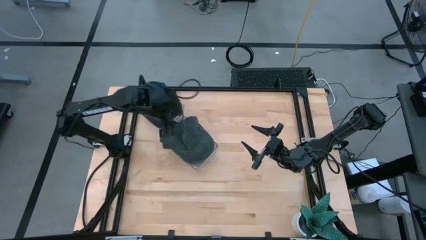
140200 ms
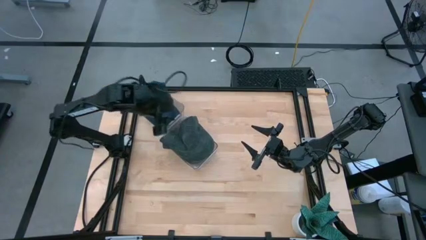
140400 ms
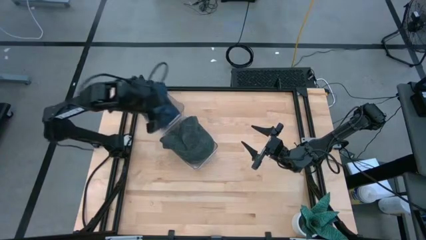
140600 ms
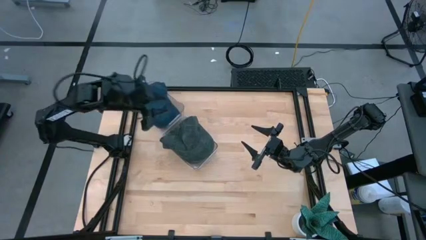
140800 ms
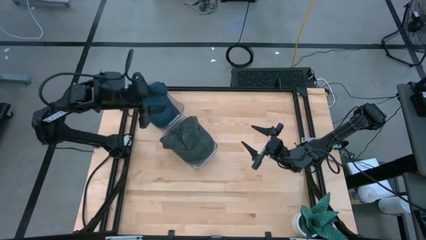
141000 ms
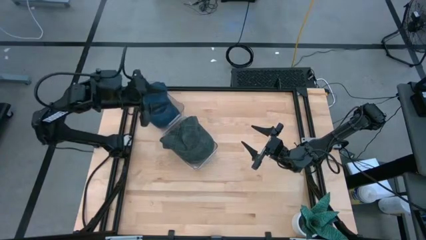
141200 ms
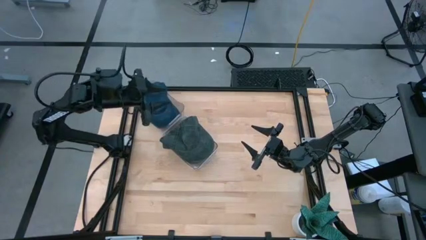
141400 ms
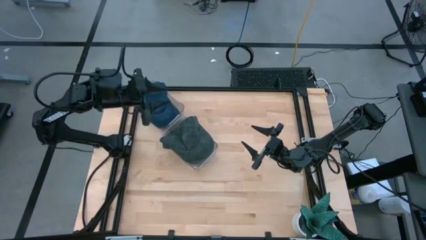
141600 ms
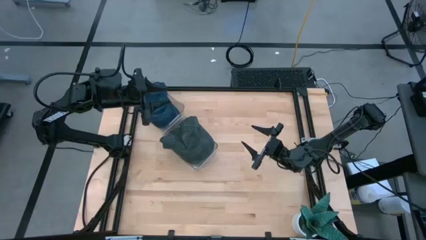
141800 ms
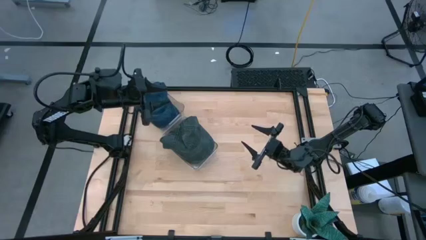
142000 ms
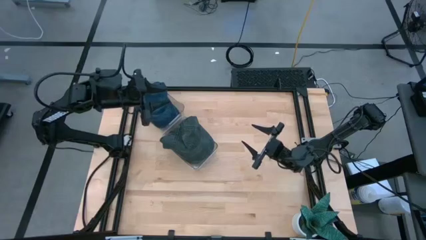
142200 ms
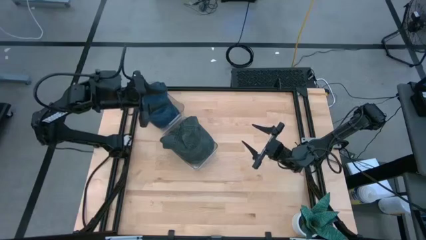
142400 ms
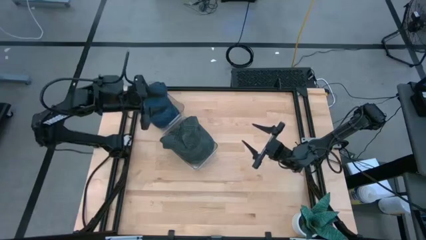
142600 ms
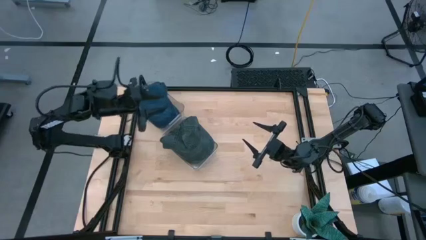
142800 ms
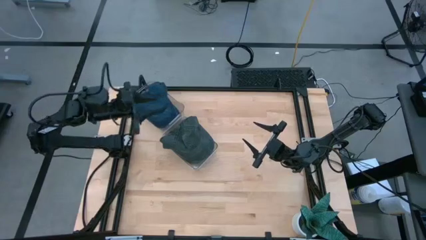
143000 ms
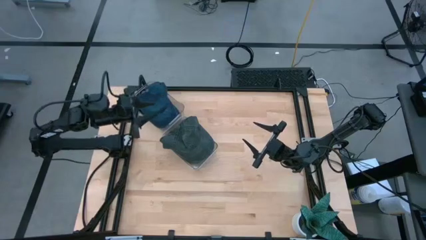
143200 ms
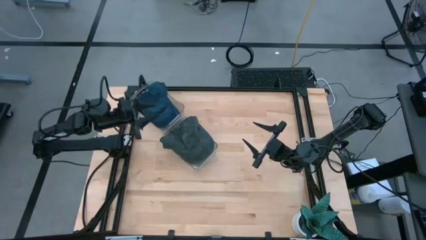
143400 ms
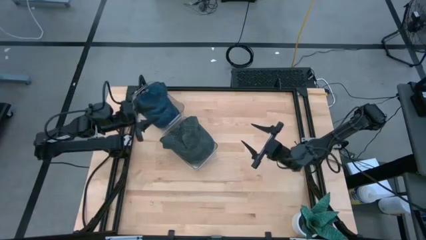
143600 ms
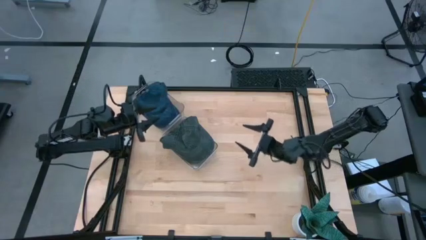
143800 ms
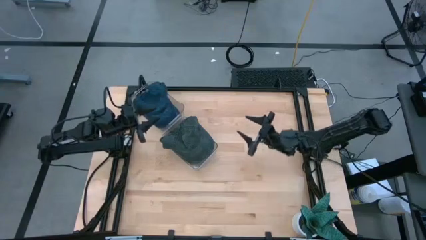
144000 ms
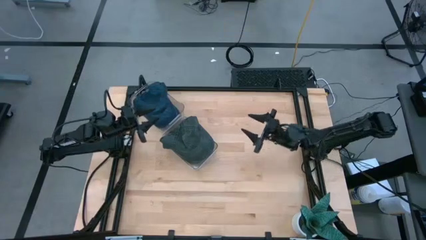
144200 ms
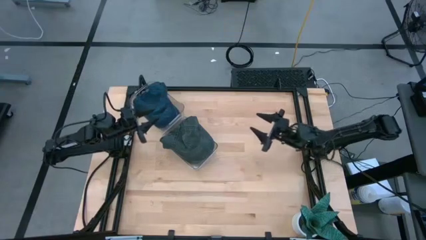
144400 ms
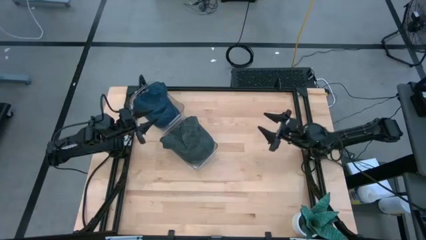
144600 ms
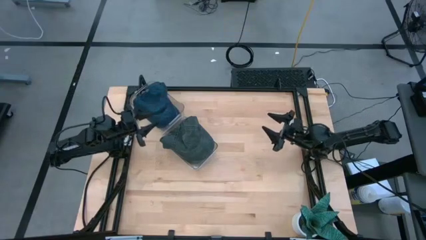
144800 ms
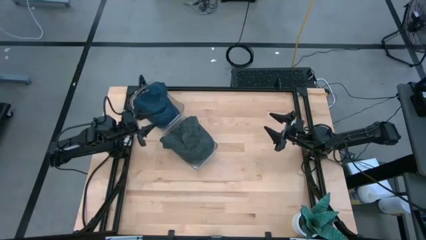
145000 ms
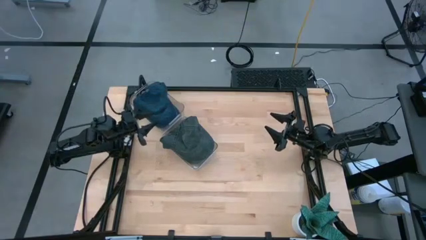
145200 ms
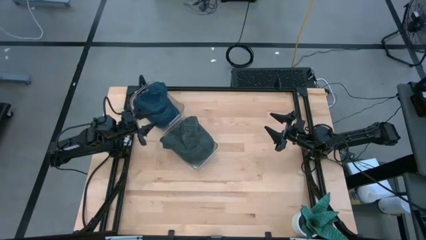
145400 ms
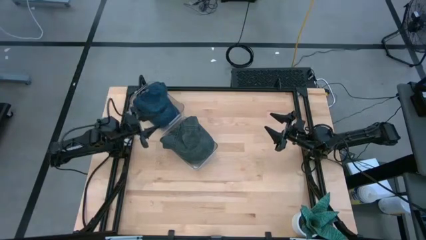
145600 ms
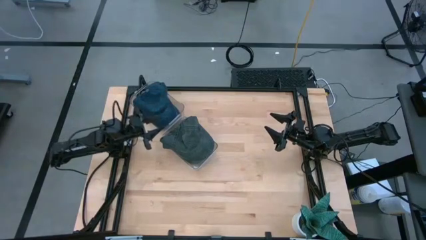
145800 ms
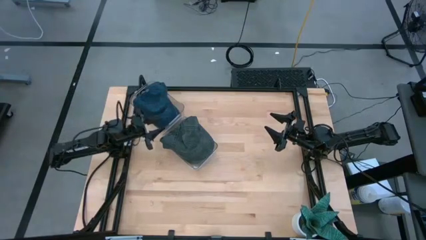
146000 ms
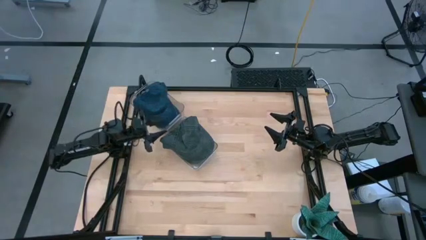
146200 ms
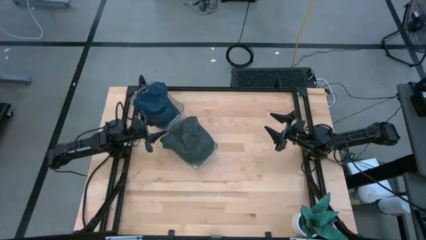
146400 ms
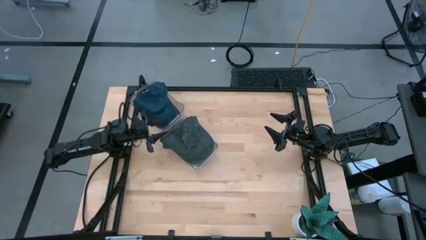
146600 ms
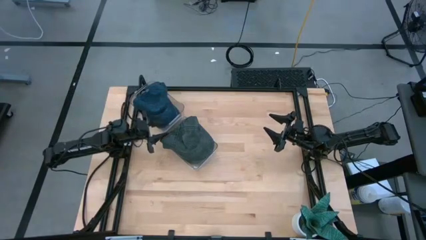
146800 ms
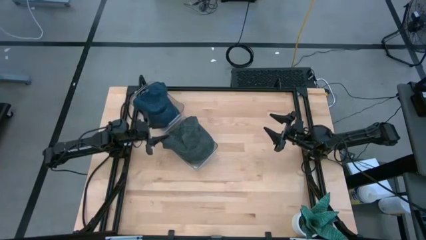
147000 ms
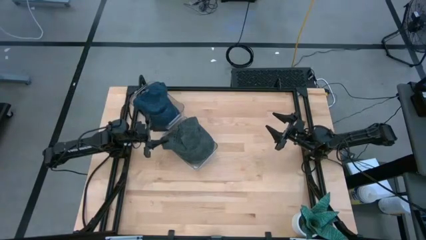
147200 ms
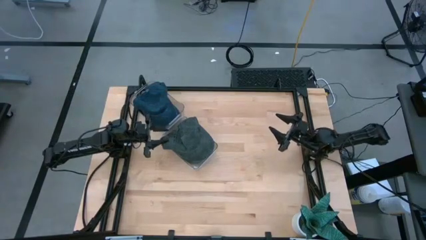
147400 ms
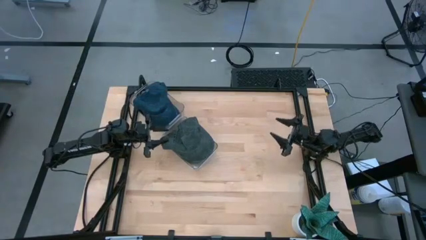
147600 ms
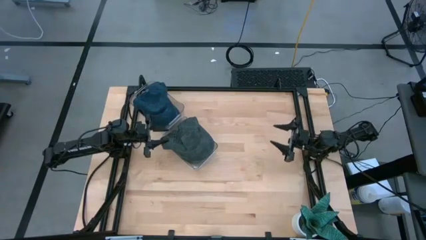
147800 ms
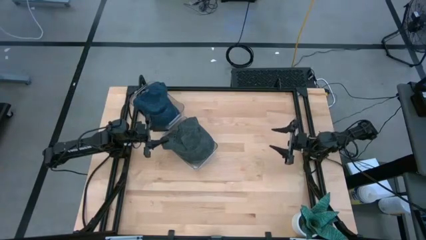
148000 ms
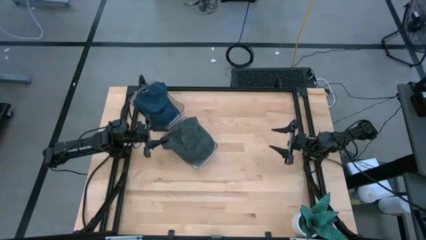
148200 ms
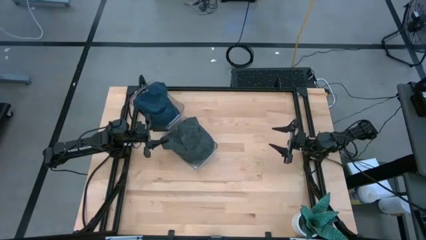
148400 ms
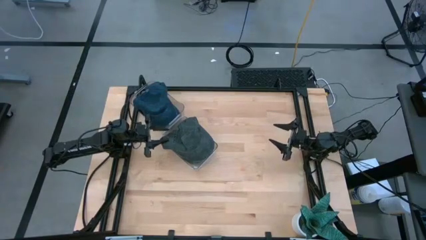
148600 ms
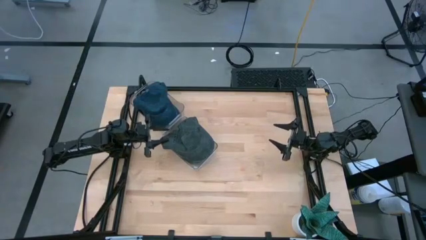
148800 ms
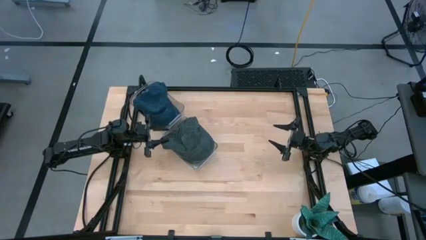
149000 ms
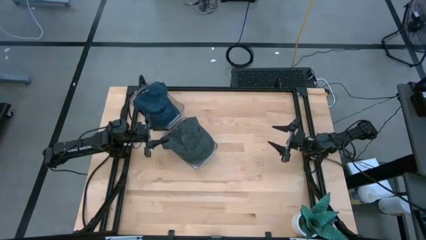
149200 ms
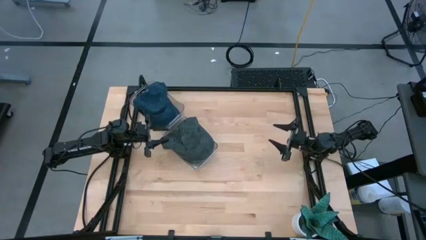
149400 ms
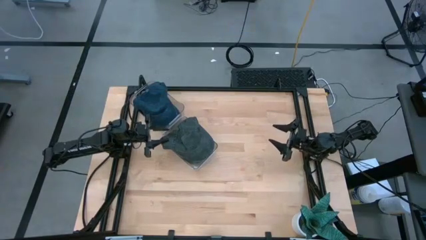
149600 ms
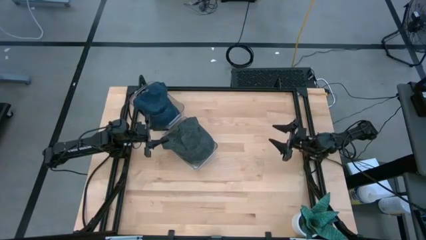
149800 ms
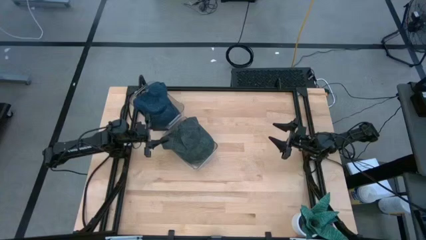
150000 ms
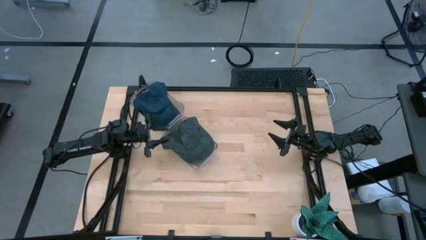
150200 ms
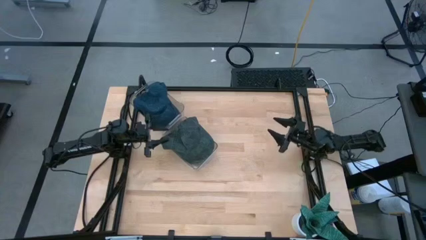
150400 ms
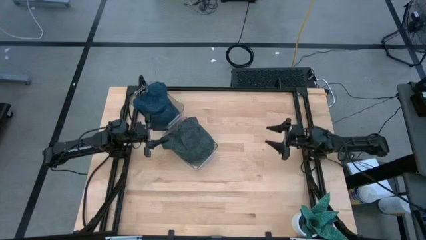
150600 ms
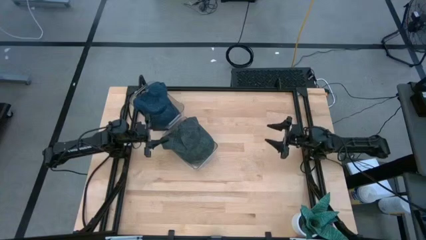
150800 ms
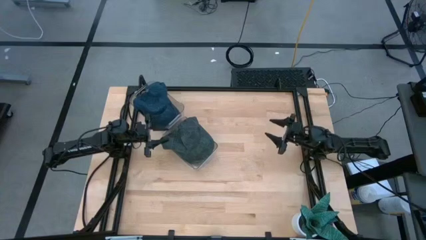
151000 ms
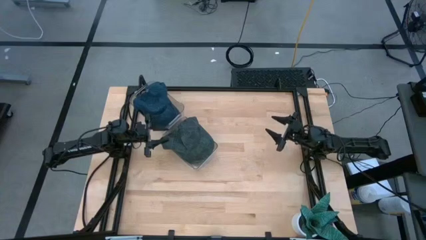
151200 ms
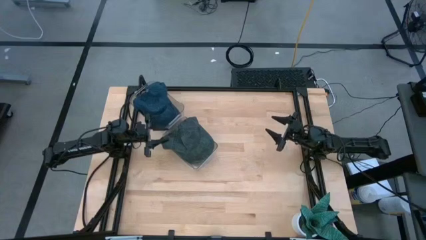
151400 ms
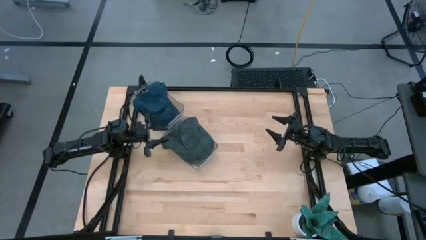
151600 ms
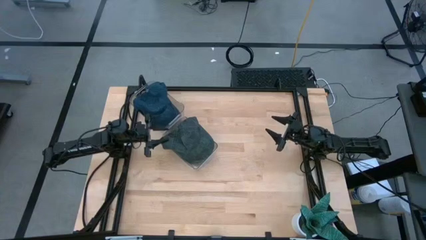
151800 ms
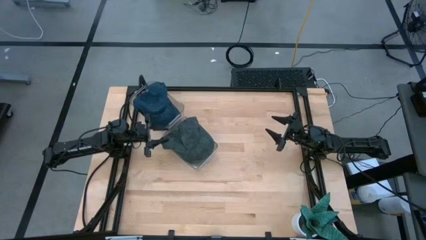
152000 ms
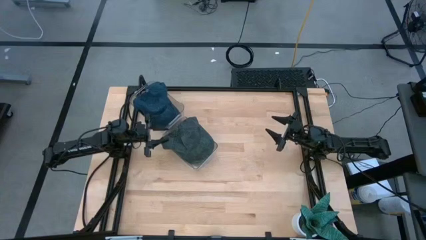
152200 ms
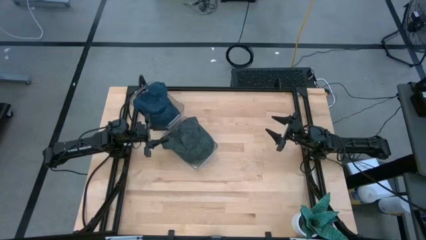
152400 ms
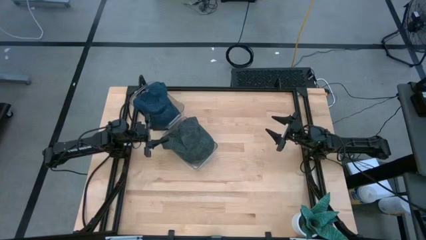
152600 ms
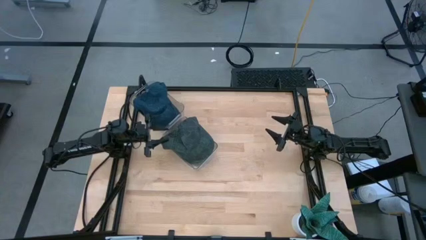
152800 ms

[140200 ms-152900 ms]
Task: Pick & Place hat
Return to Home Position

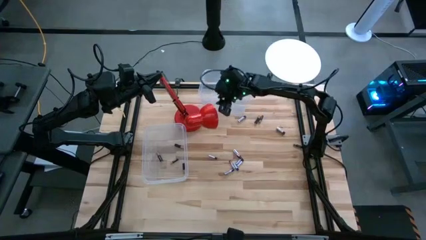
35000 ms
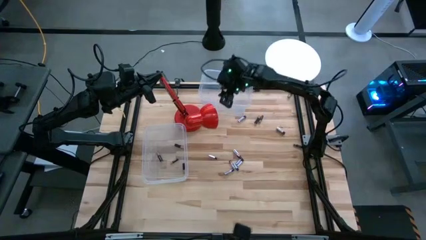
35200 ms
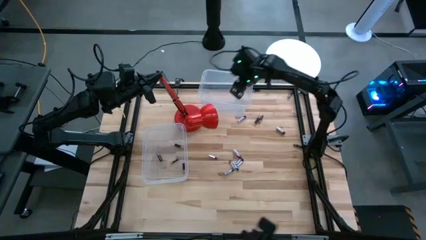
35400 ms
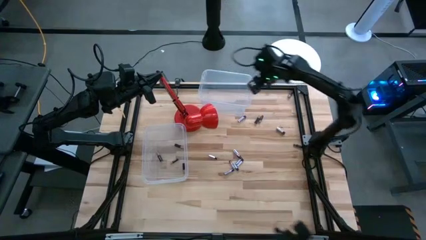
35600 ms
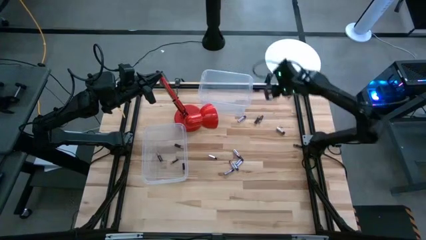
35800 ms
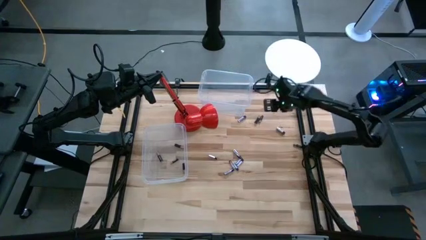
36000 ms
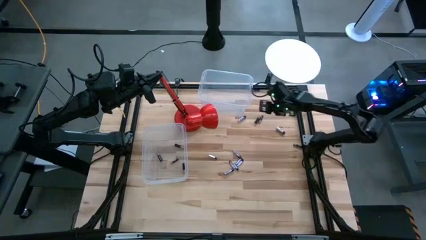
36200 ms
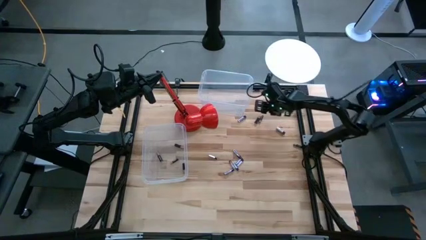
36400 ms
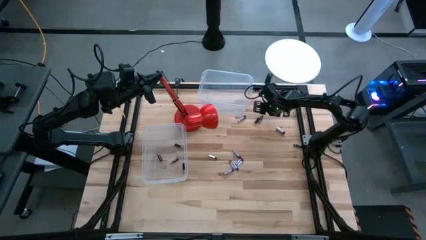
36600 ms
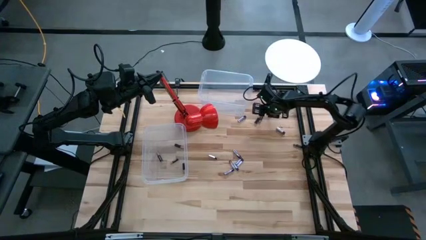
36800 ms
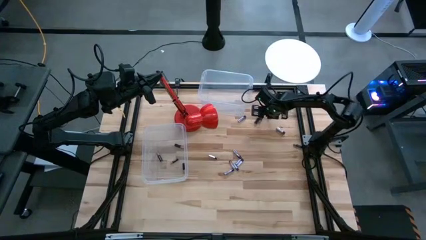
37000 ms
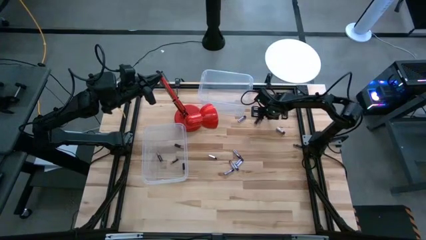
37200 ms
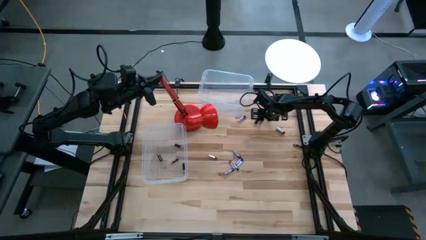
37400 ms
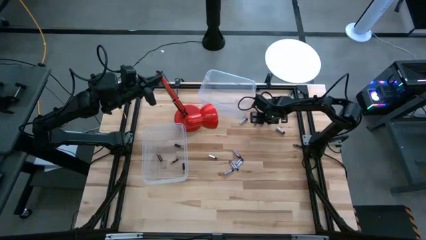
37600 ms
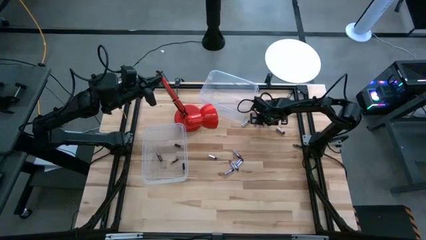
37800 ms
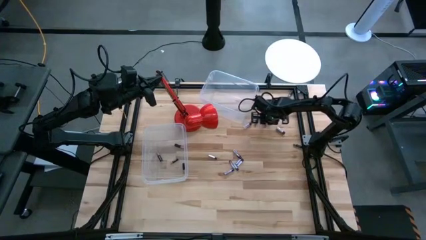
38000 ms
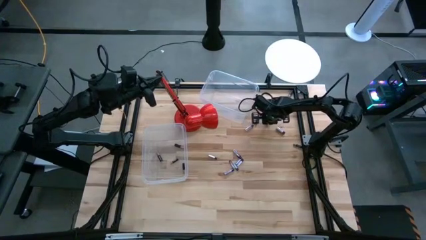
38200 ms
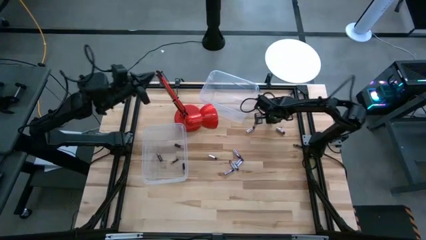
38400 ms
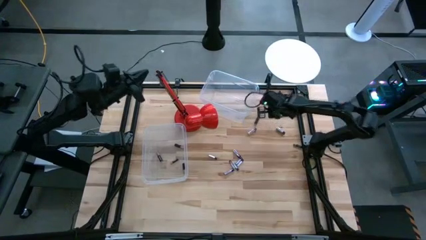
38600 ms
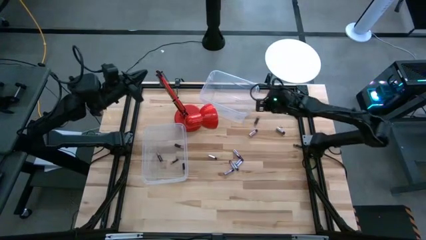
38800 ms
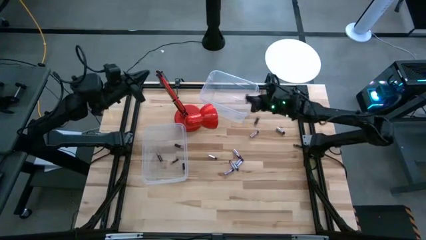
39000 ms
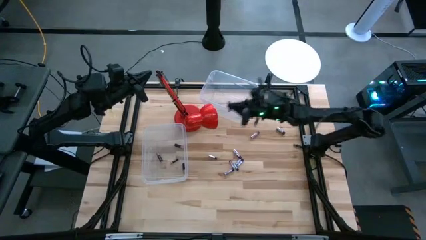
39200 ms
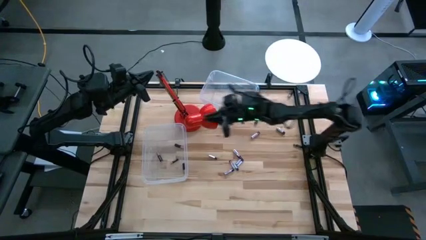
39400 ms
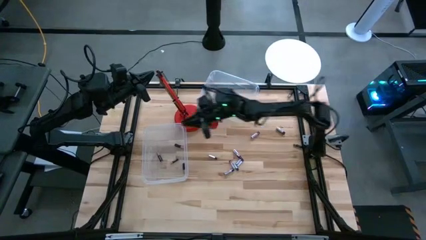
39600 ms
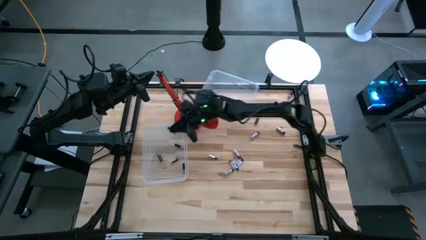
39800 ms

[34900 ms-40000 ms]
Task: Sort batteries
Put the black battery into the bottom transparent bin
